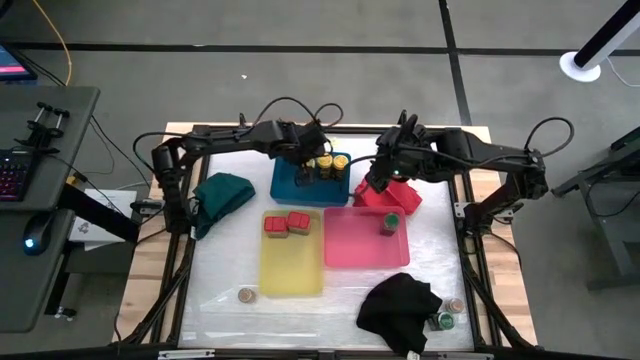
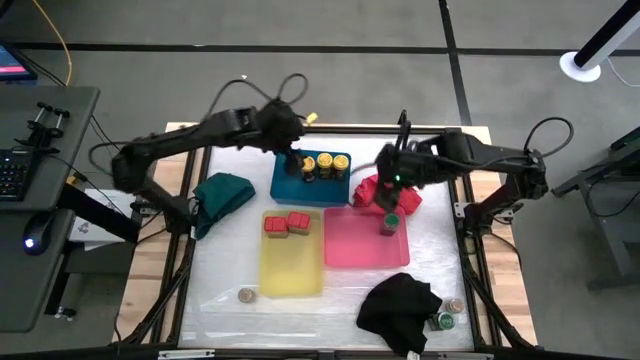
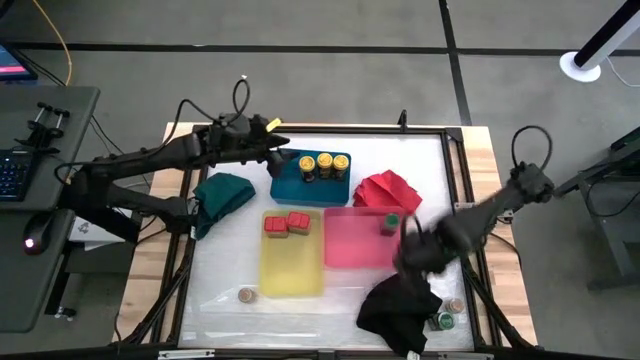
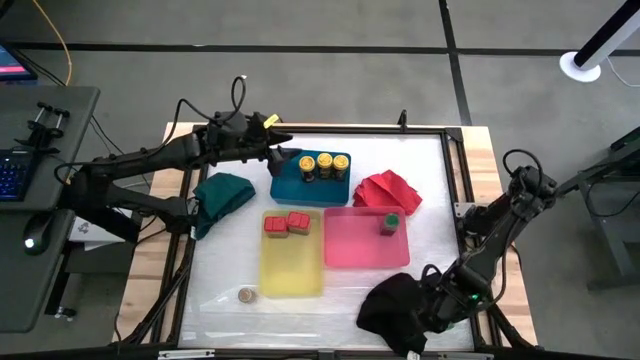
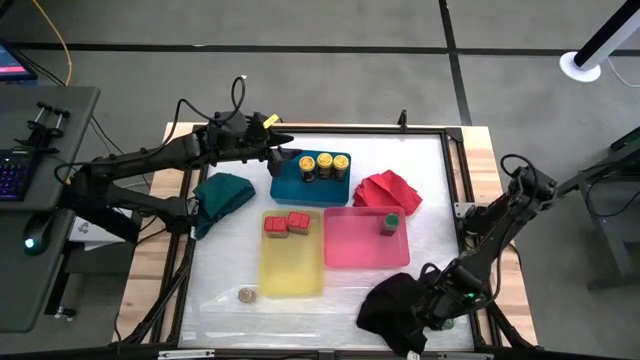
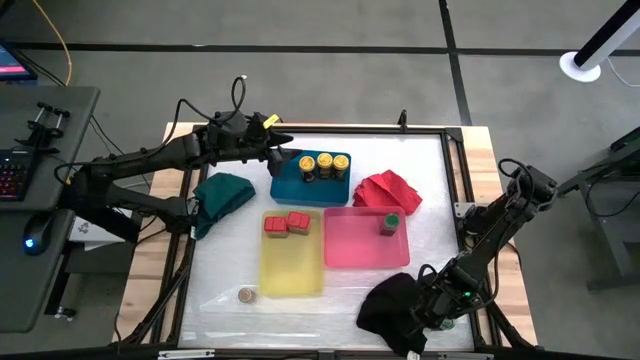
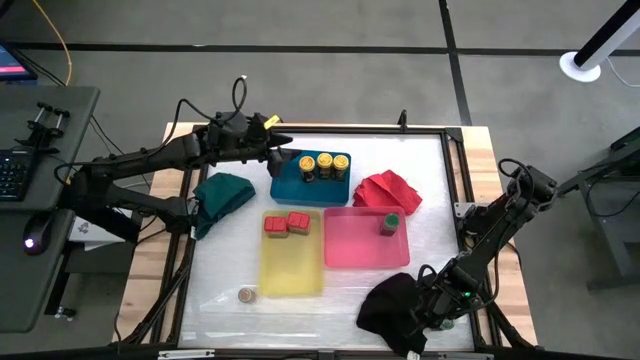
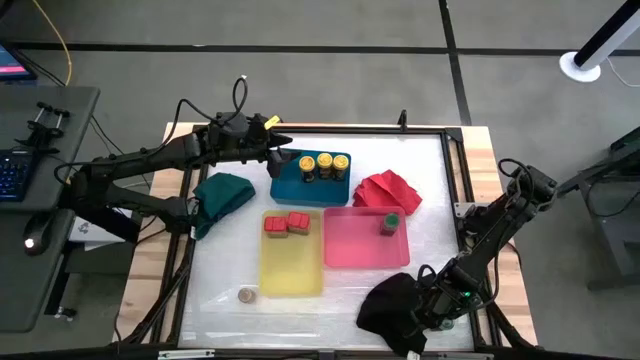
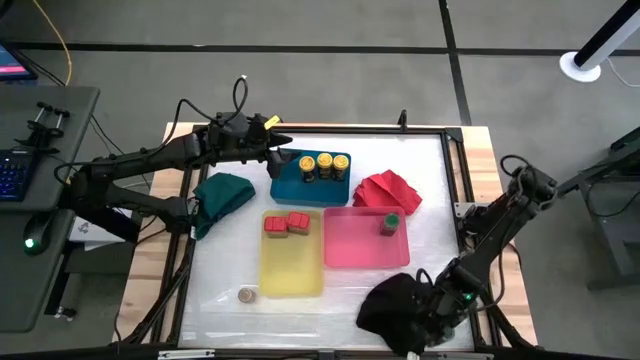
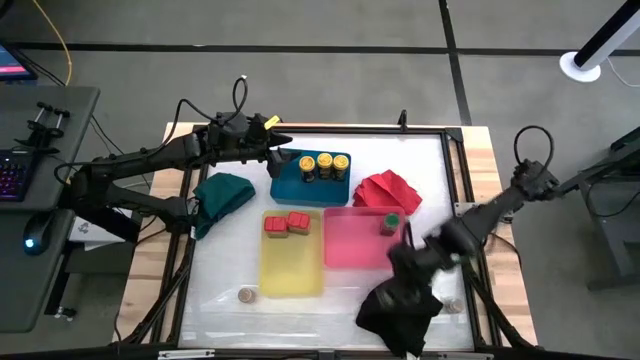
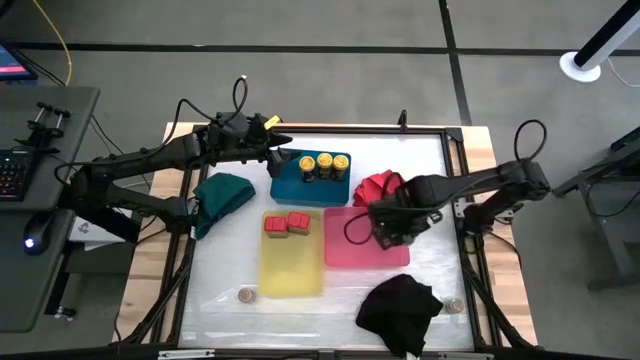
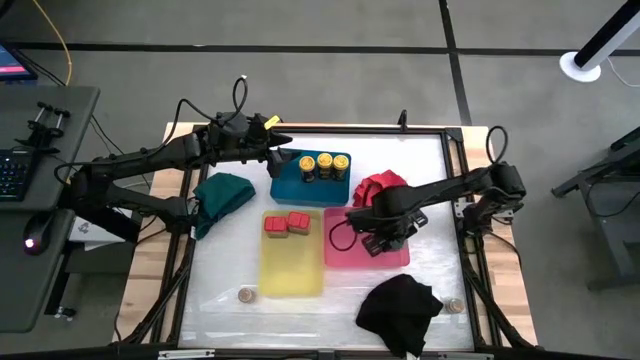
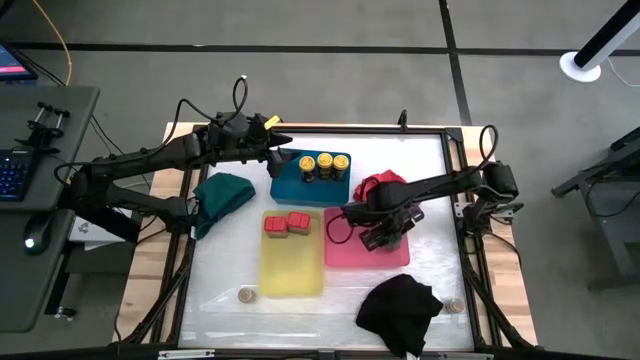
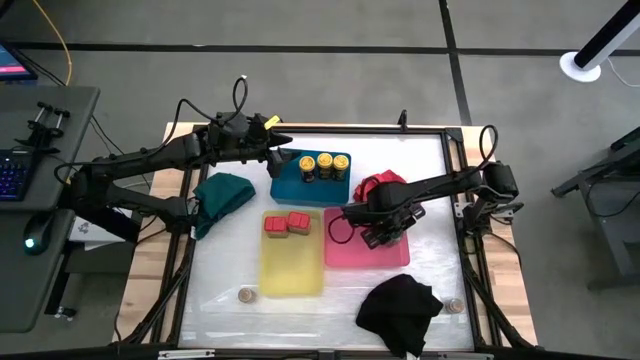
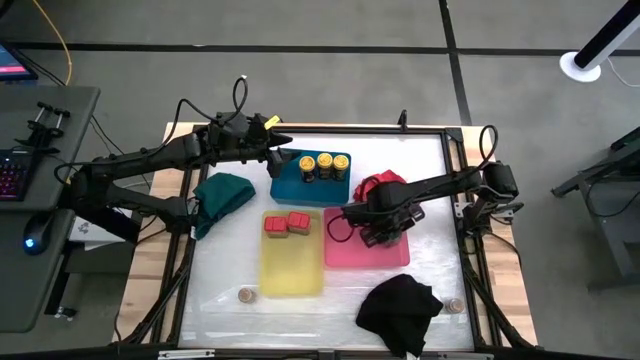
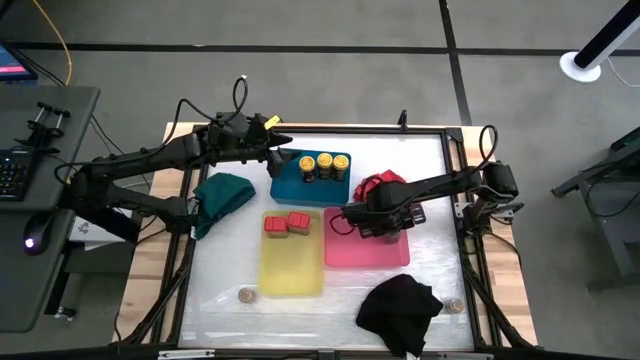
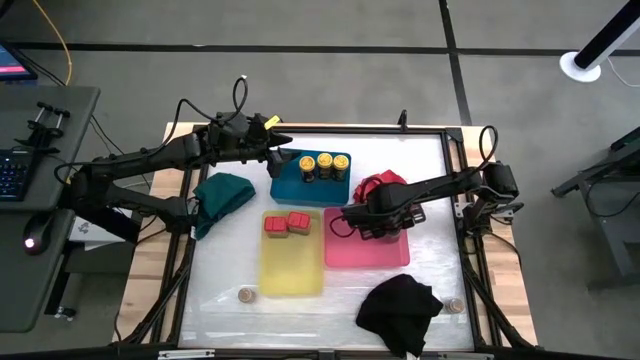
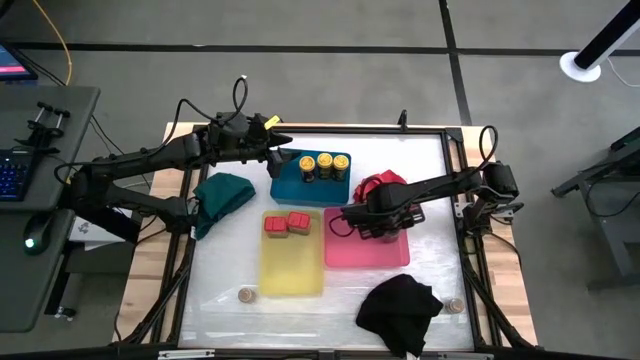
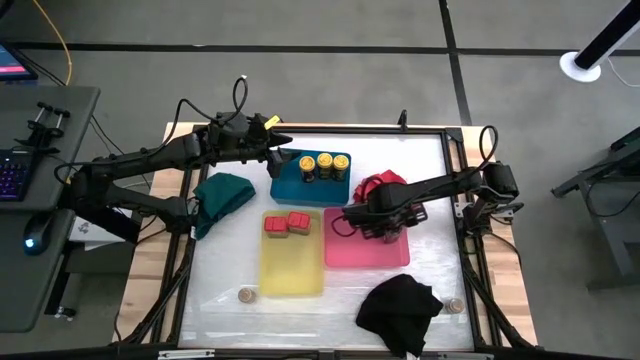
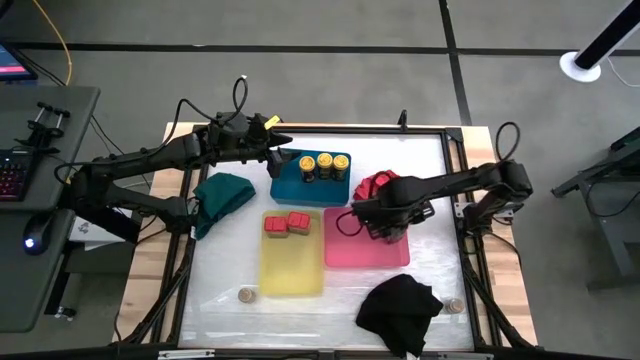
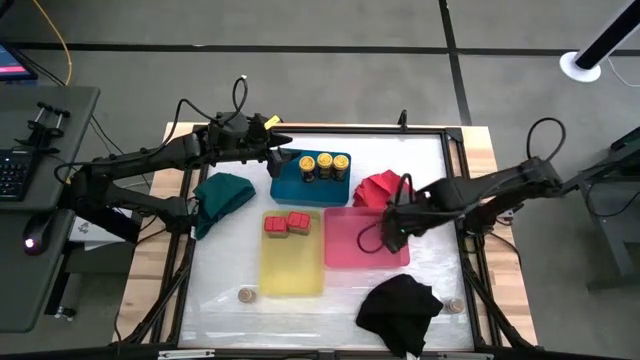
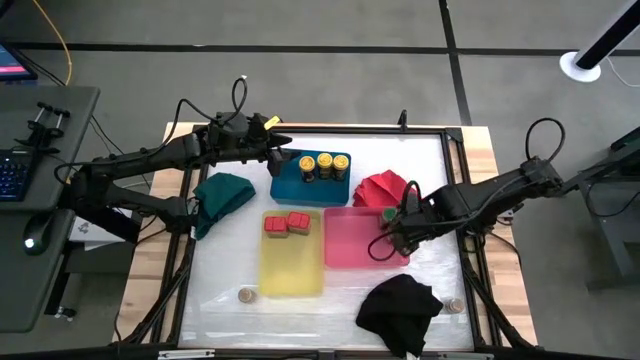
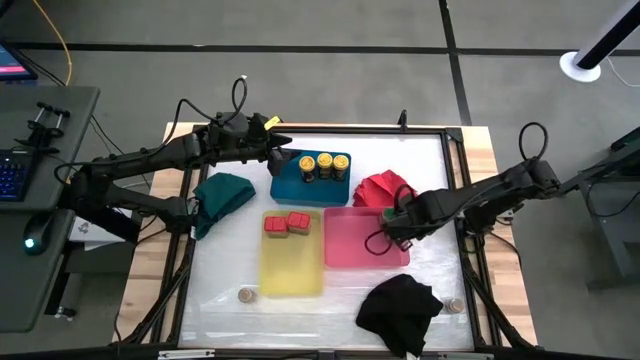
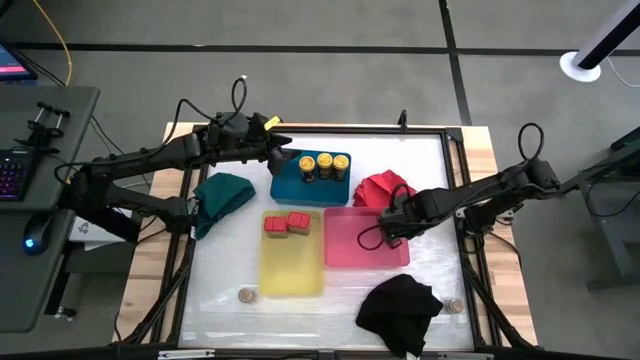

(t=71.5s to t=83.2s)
Task: Sort spices by type
Put the green spice bottle into the red bin

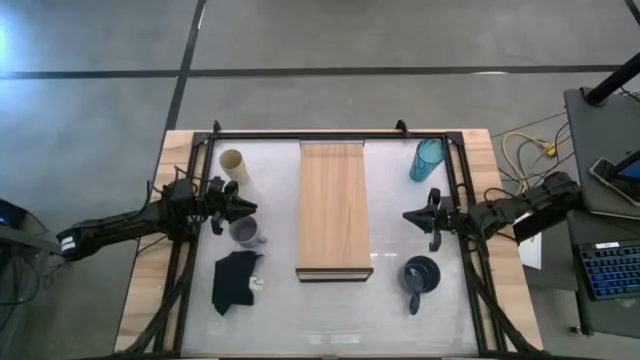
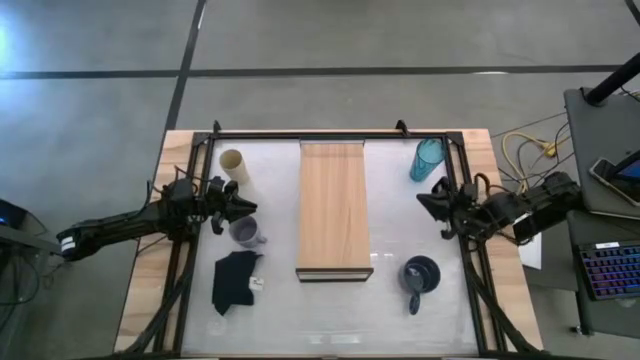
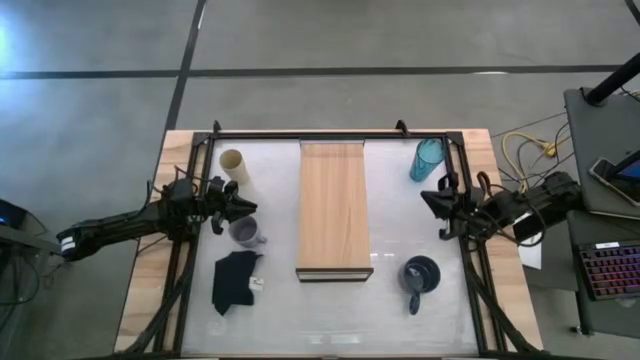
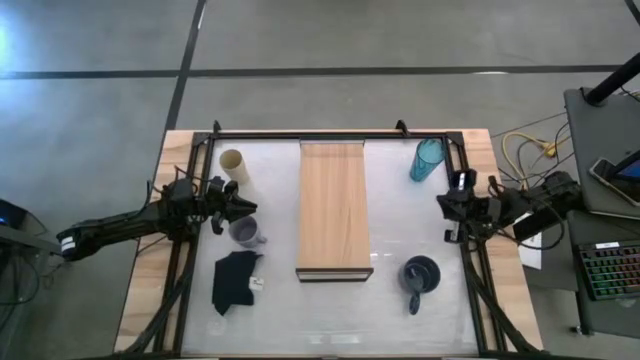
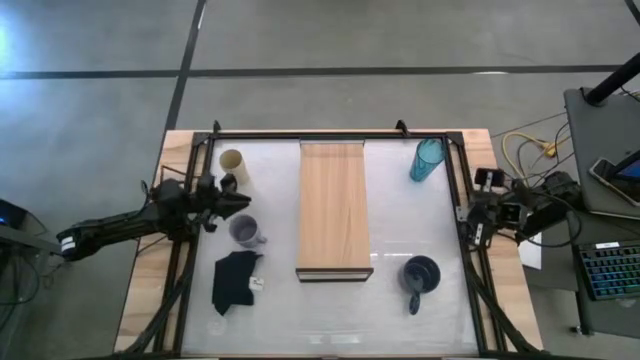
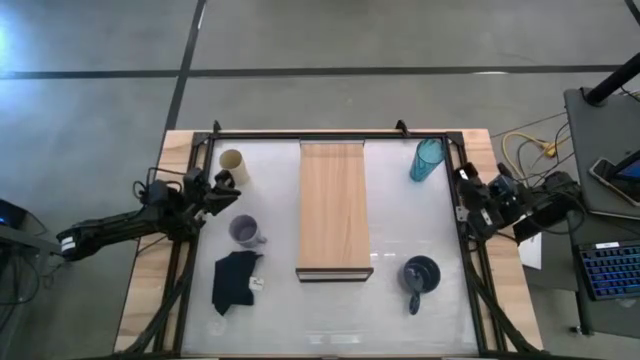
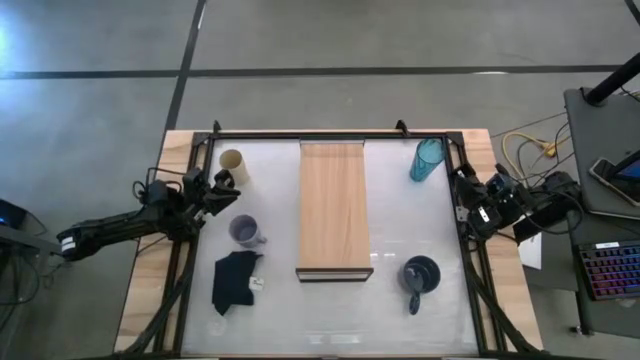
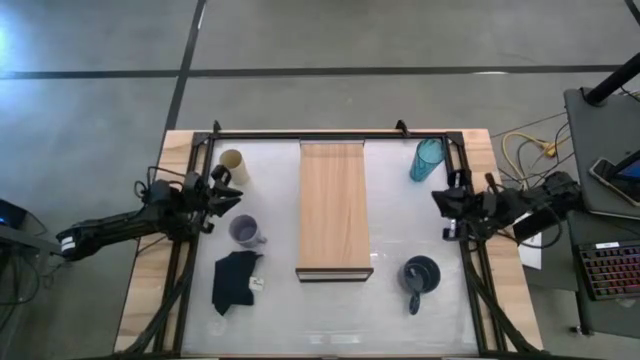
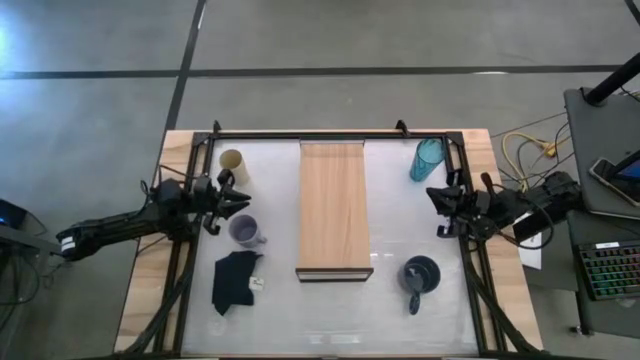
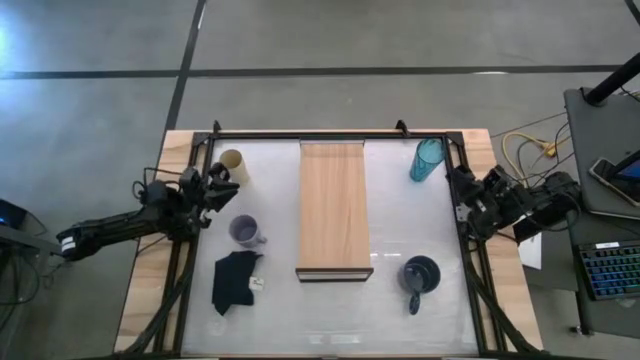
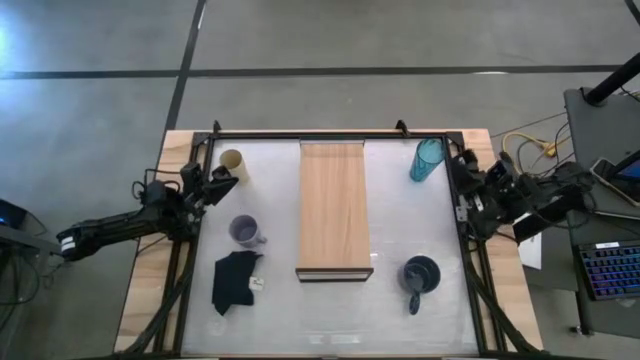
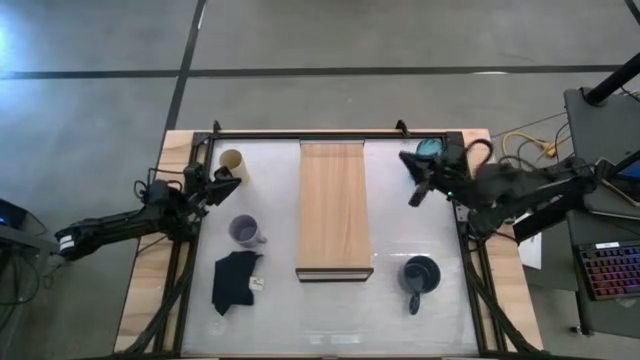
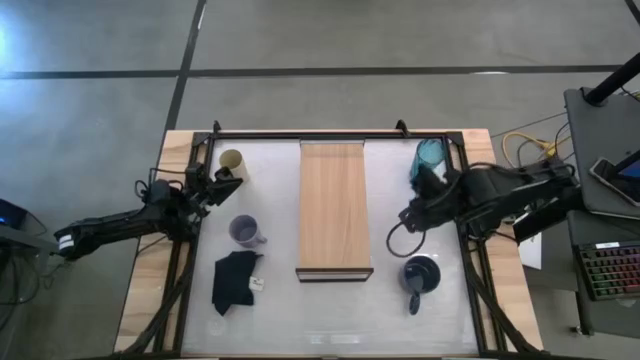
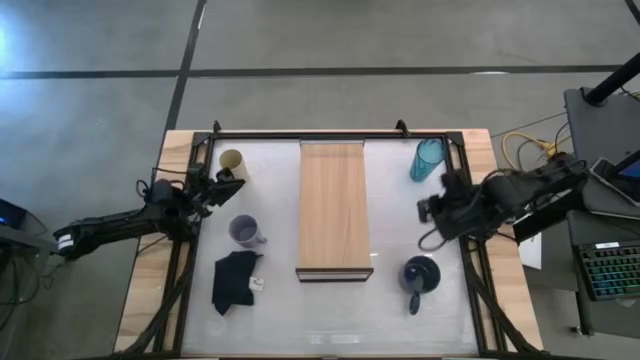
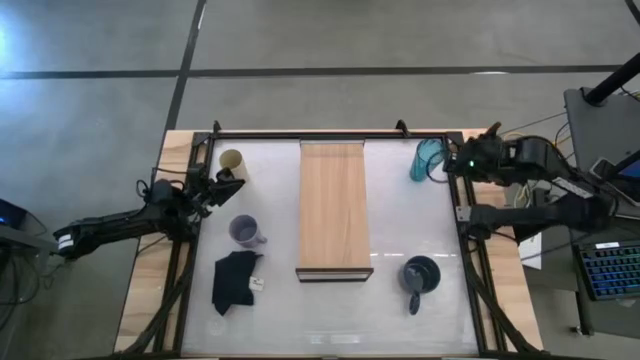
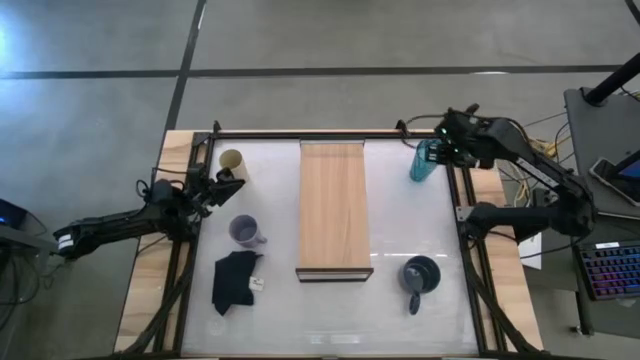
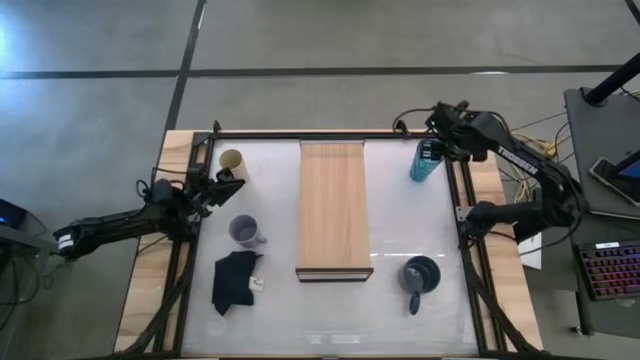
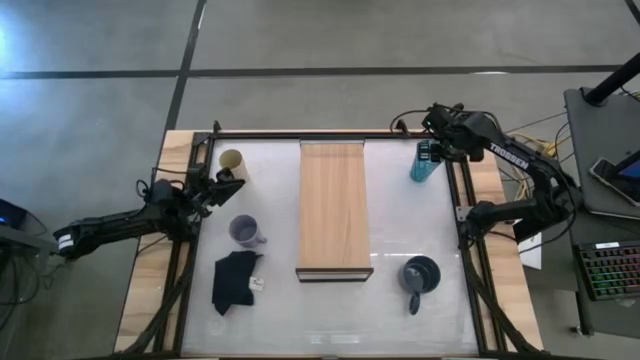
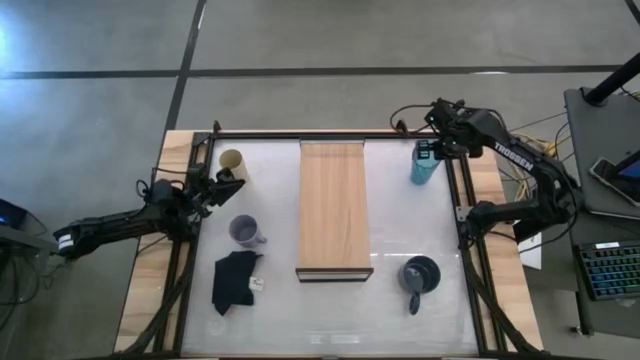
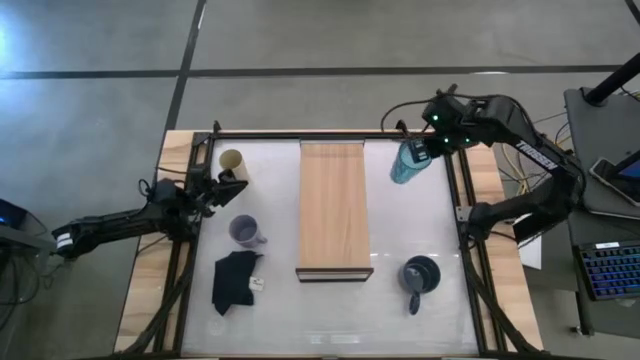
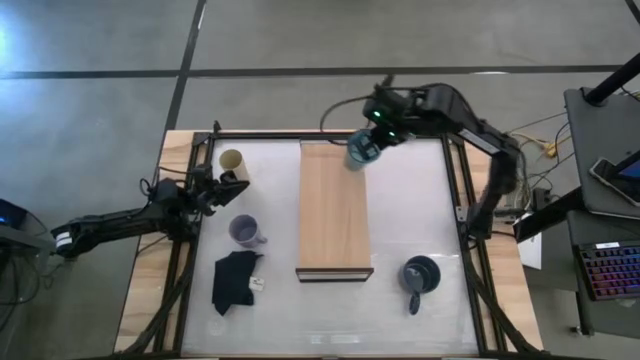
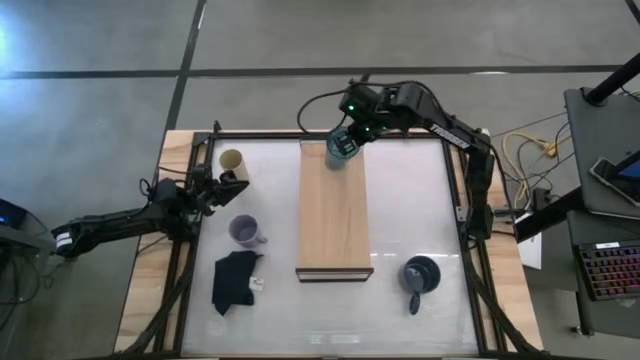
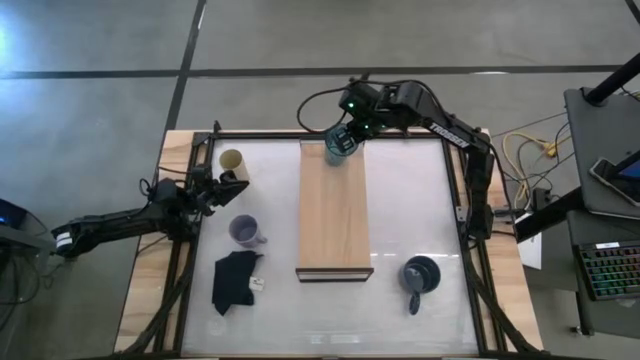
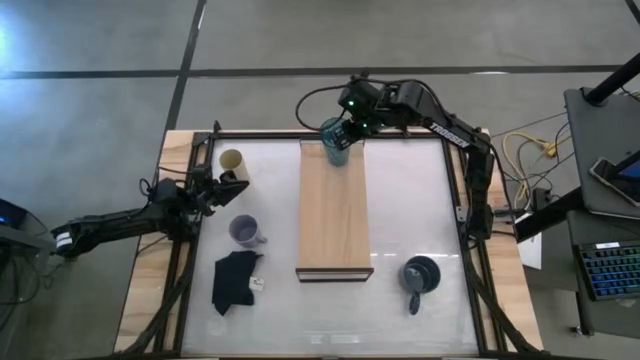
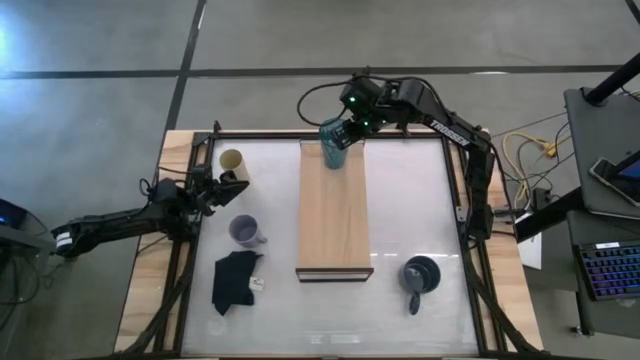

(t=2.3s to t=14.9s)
Task: Stack small to large cups/mugs on shelf
Put the light blue cup on the shelf
